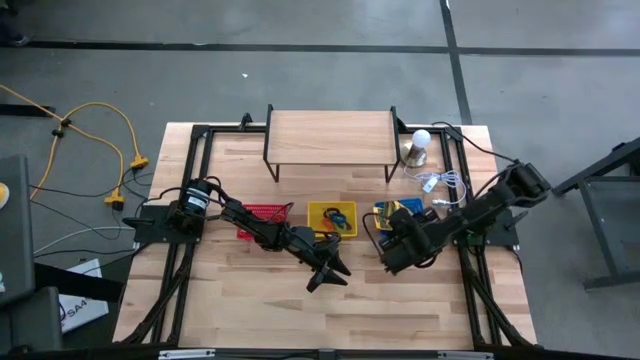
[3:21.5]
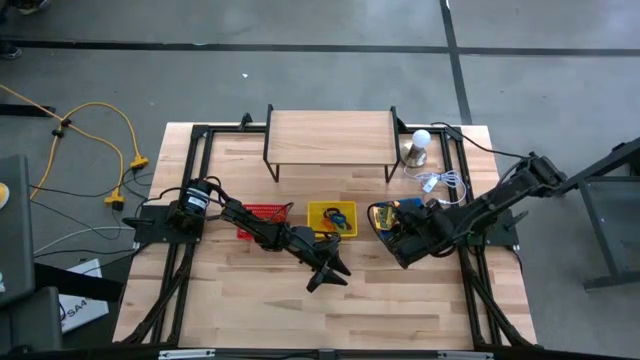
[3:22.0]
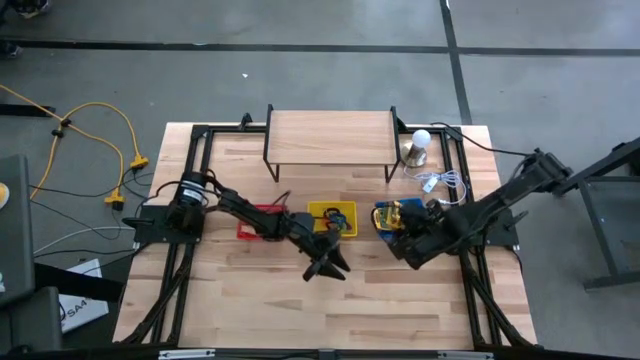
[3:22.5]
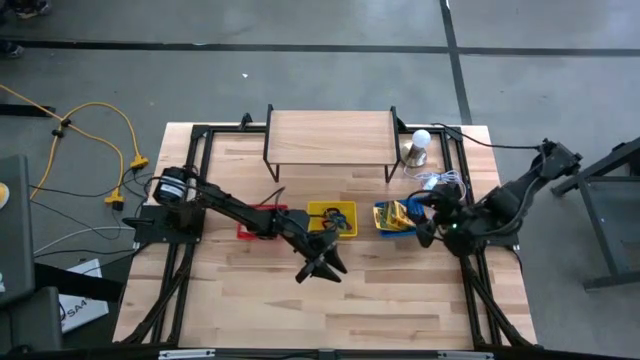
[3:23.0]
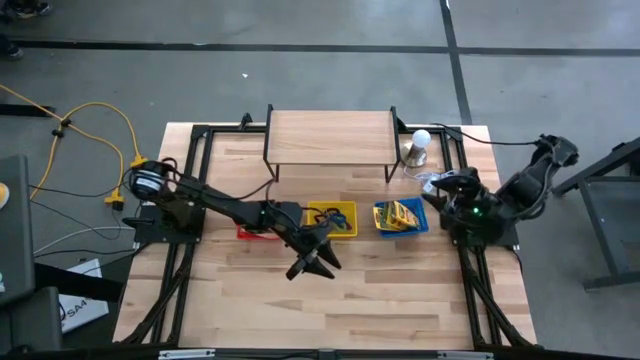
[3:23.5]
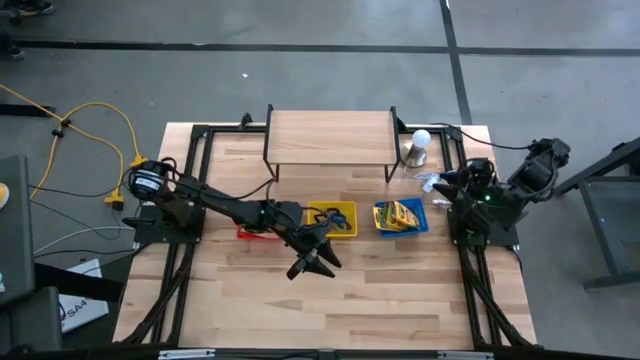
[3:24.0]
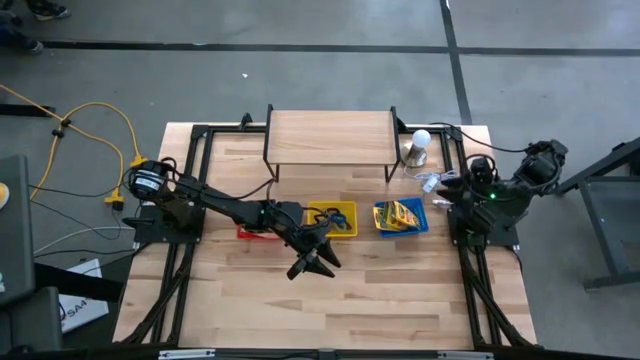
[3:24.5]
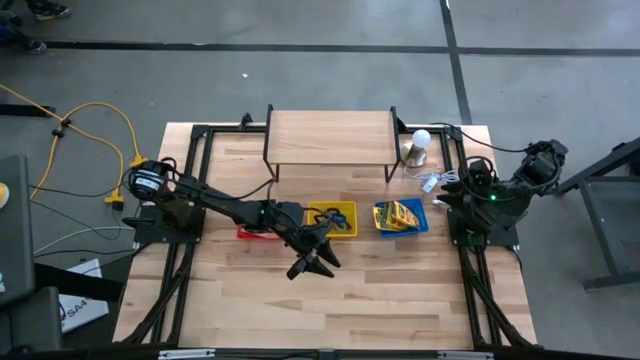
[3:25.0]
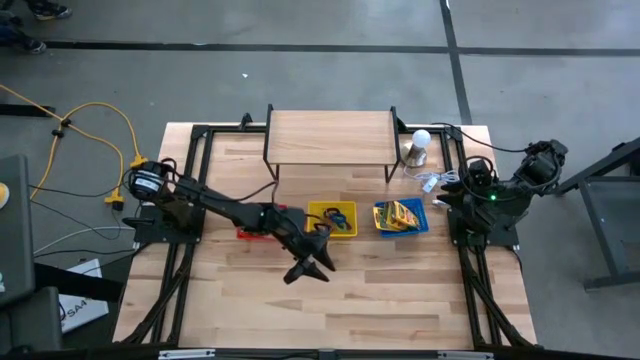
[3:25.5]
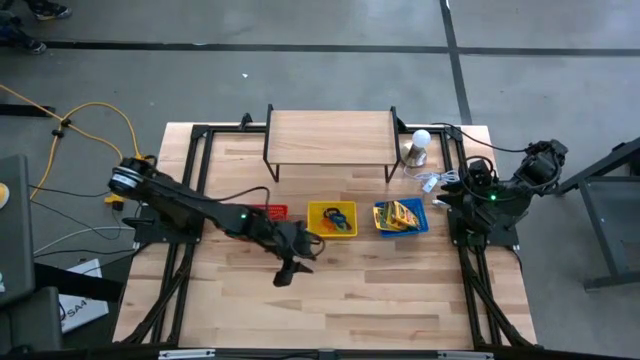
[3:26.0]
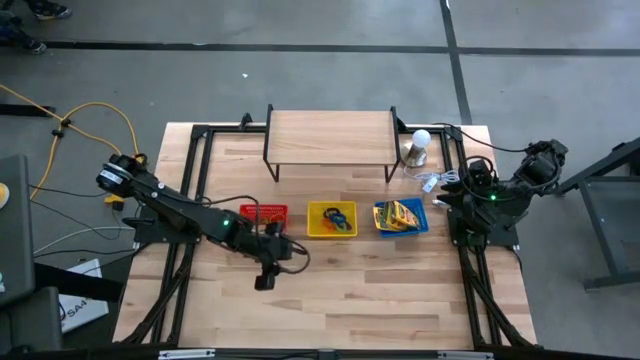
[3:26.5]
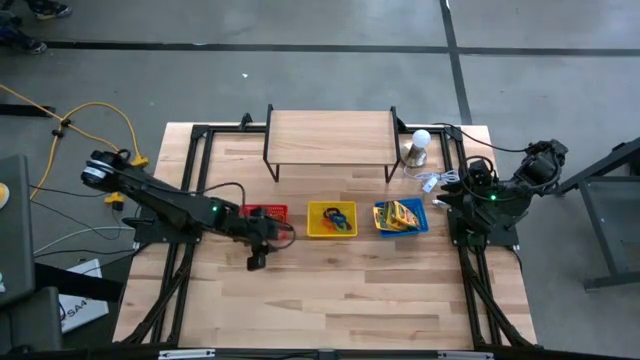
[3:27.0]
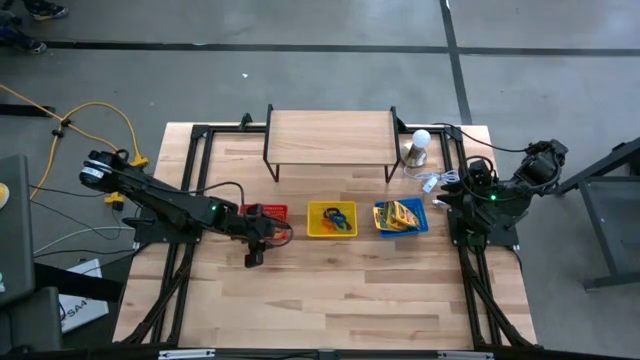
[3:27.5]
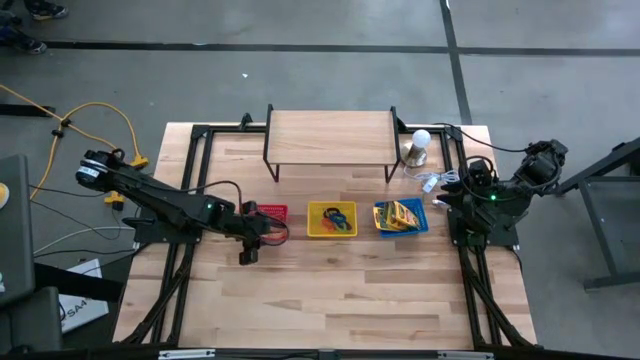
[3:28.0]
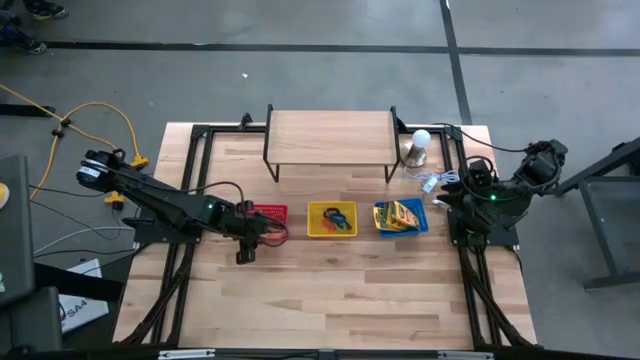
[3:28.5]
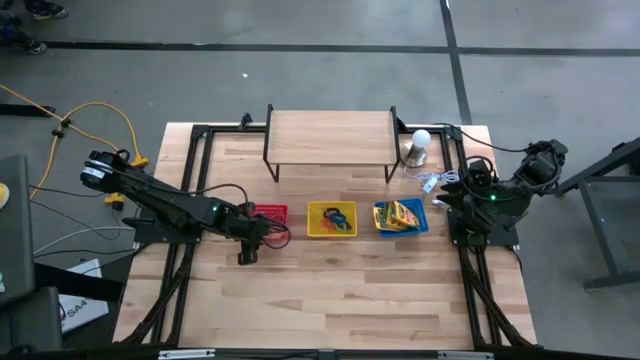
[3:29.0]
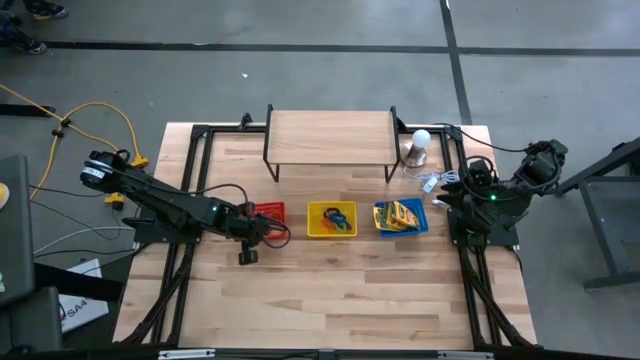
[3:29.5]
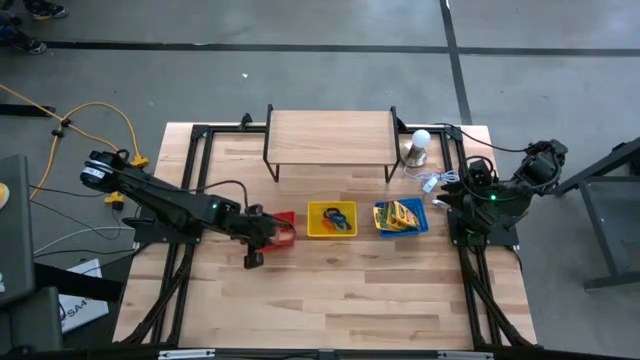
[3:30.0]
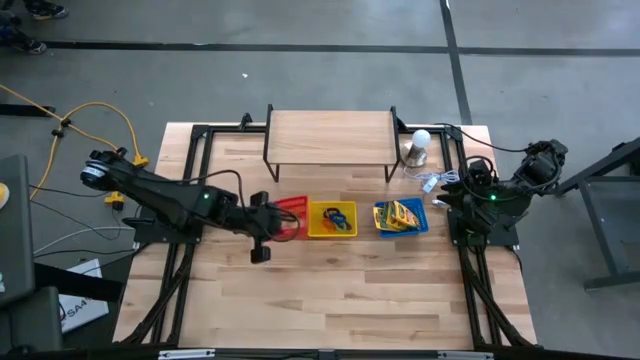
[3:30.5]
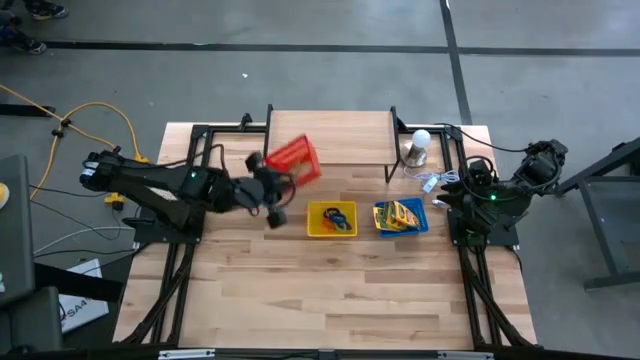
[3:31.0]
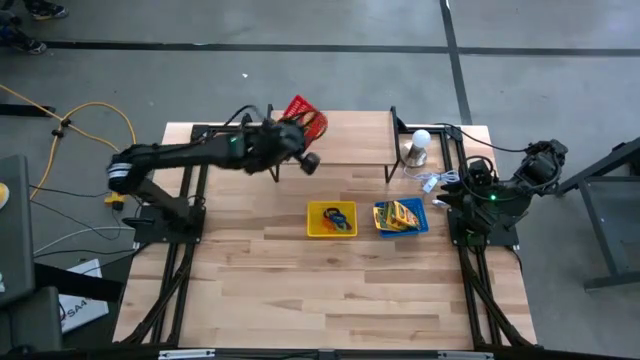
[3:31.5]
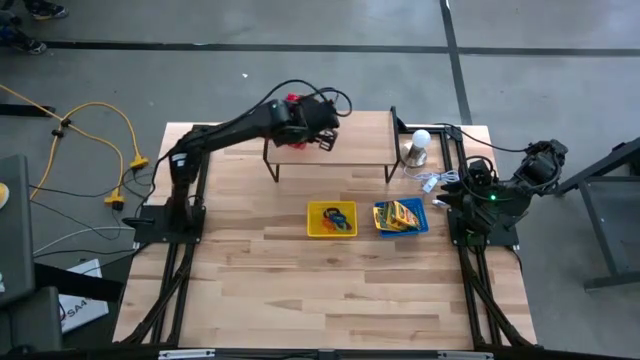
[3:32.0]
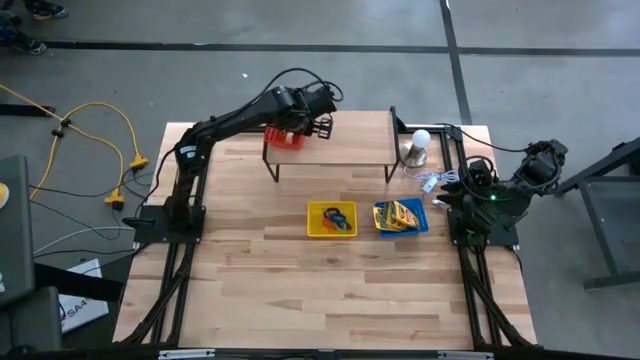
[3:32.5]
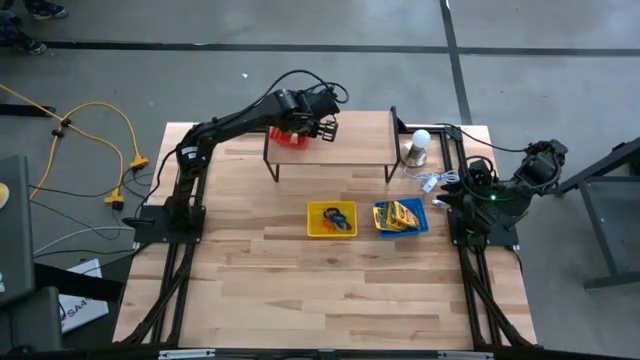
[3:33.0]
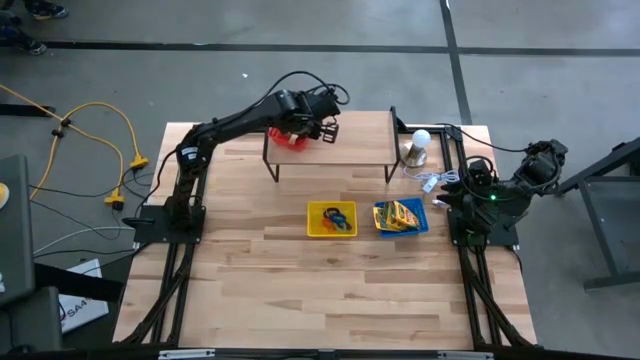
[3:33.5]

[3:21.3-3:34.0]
Task: Pick & Place Office Desk Supplies
Put the red bin on the shelf

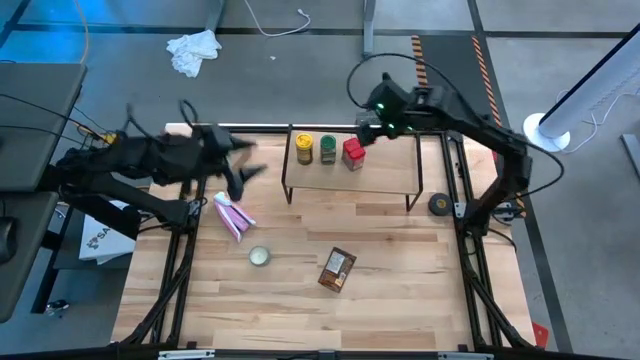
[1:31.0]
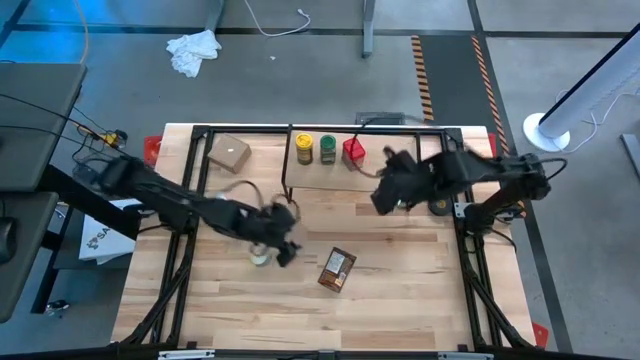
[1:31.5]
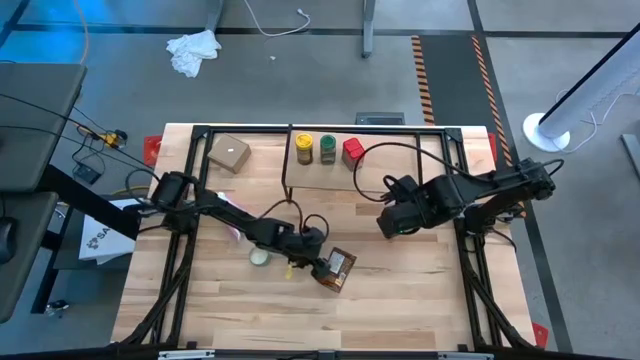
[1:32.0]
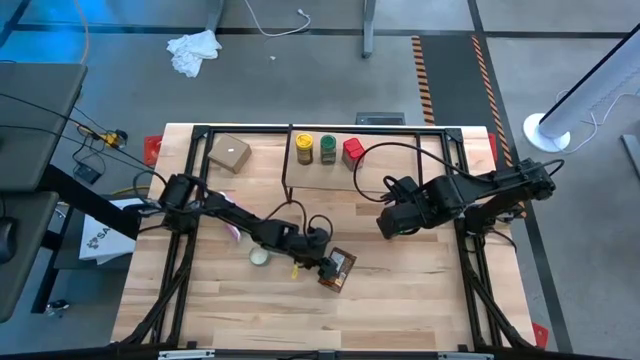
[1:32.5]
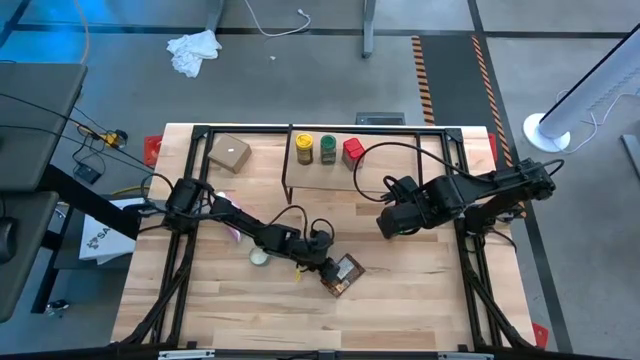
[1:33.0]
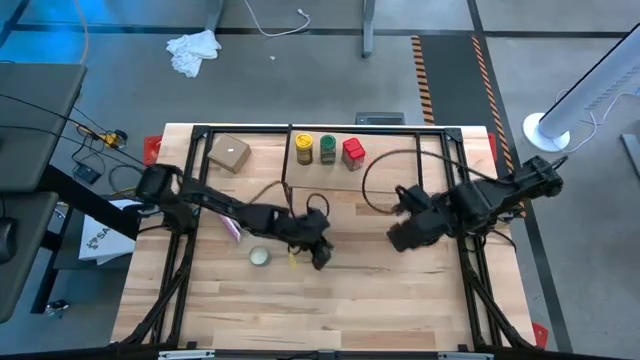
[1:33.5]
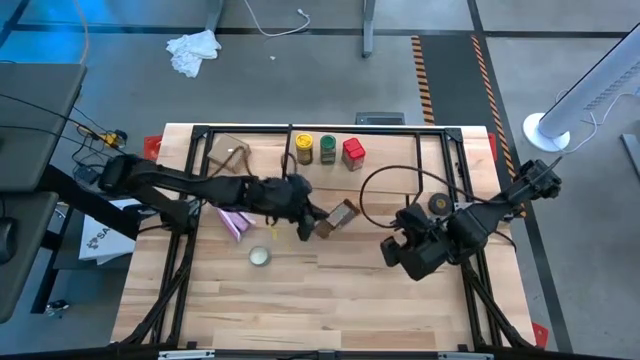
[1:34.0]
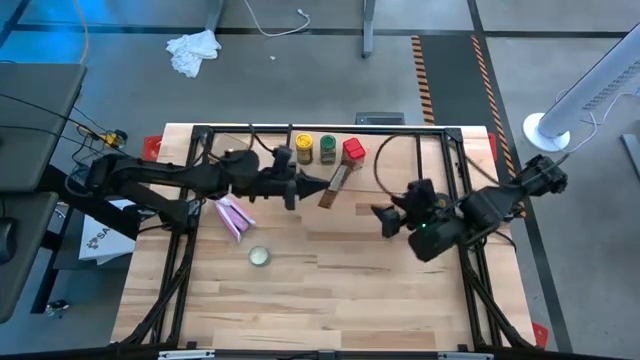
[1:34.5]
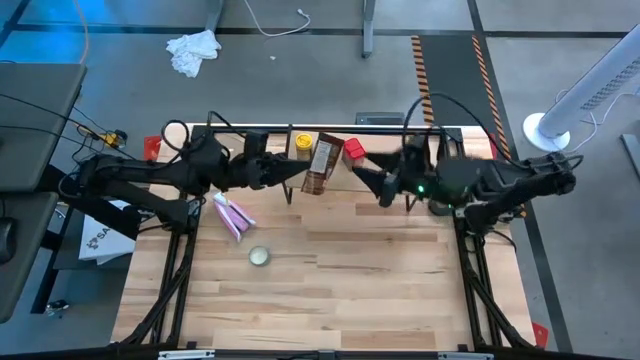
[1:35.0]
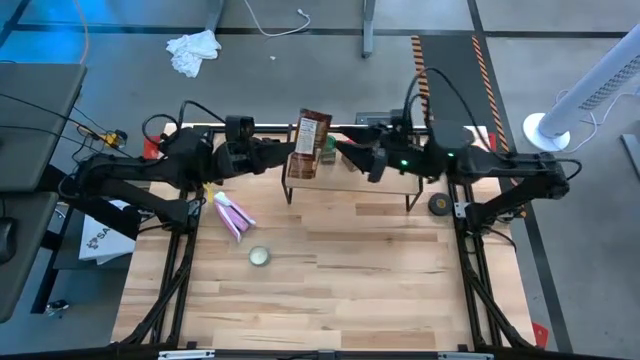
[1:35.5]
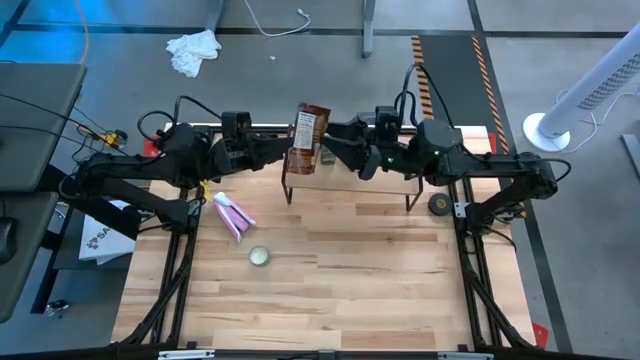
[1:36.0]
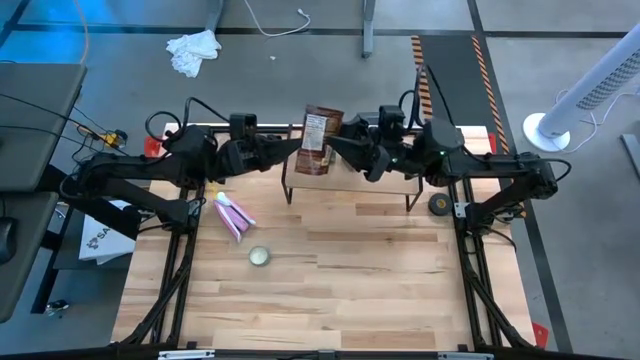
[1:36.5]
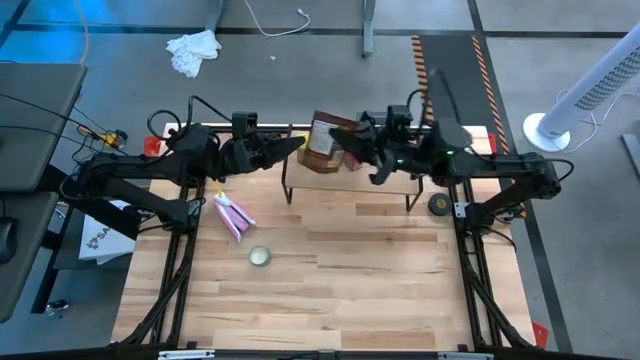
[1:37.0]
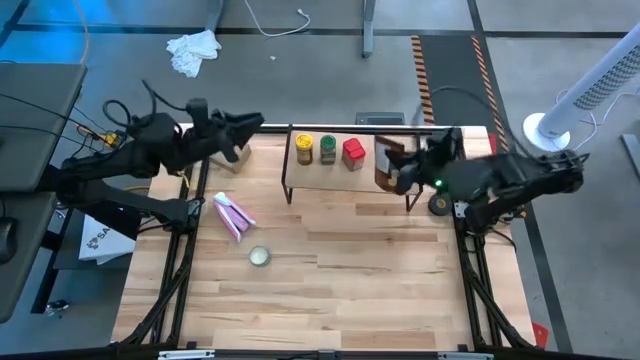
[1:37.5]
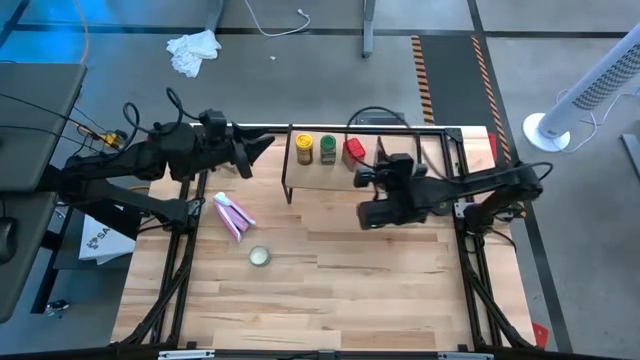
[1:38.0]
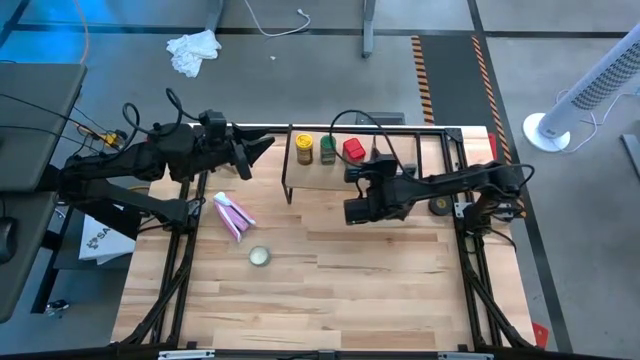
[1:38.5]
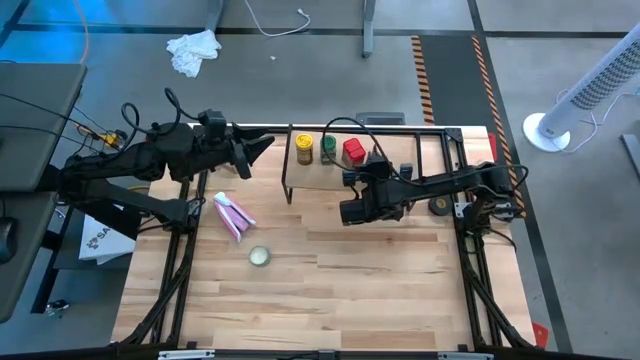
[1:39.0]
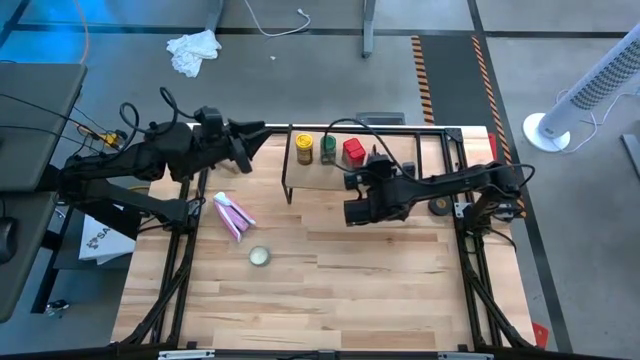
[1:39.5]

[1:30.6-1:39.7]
Task: Shelf spices
Put the orange spice pack on the shelf
